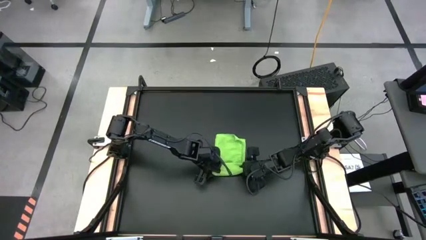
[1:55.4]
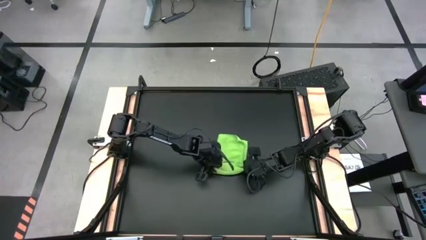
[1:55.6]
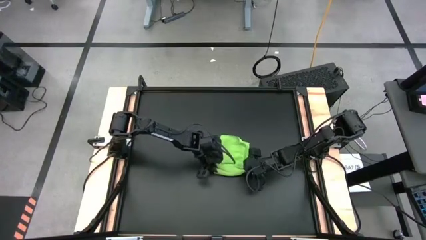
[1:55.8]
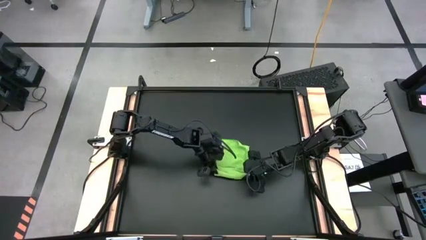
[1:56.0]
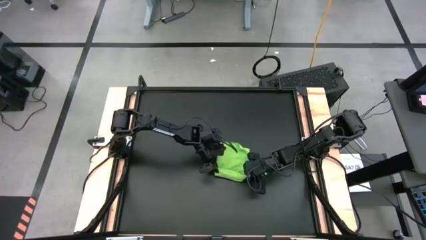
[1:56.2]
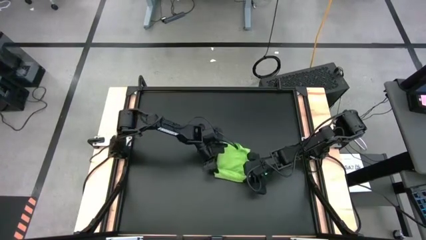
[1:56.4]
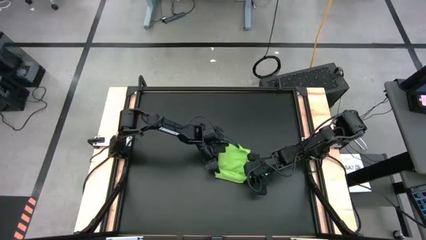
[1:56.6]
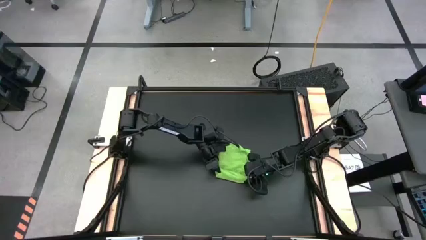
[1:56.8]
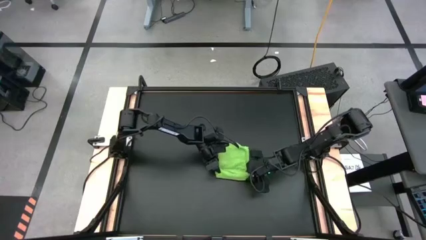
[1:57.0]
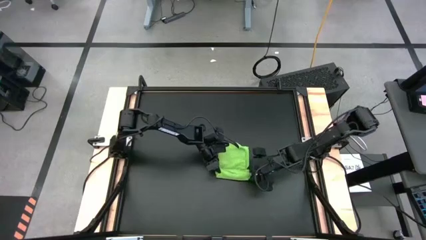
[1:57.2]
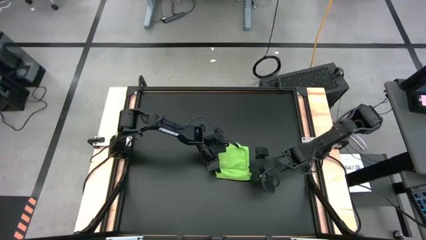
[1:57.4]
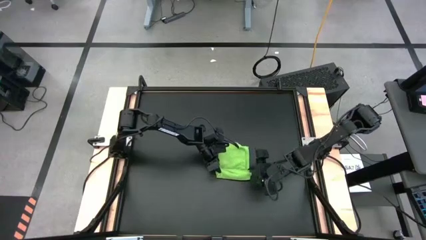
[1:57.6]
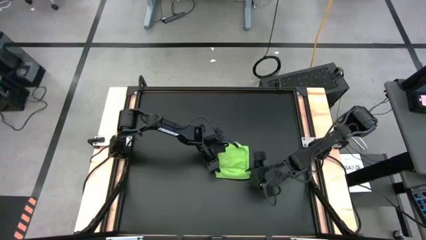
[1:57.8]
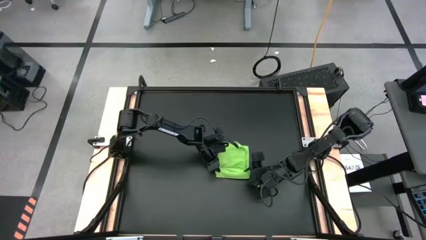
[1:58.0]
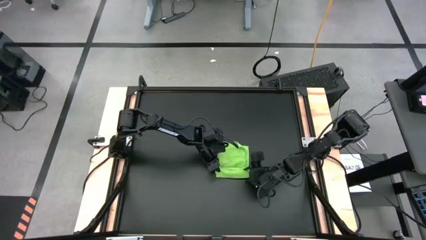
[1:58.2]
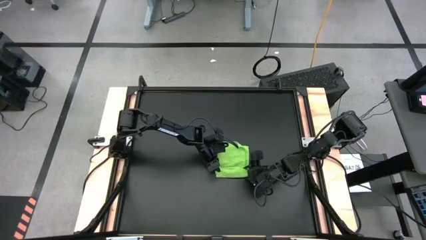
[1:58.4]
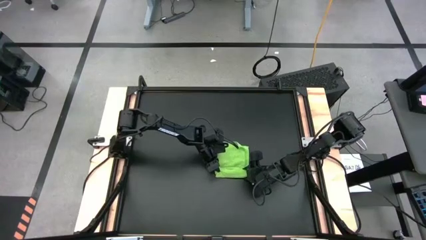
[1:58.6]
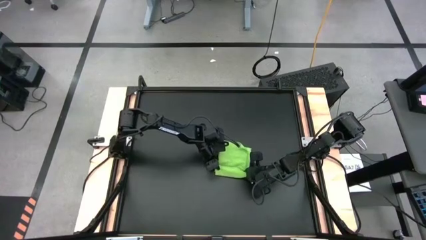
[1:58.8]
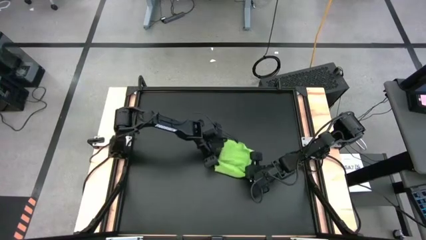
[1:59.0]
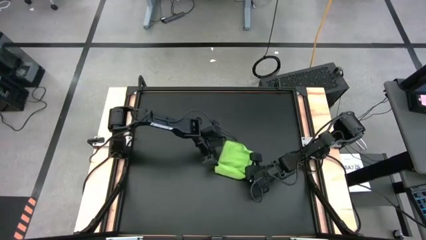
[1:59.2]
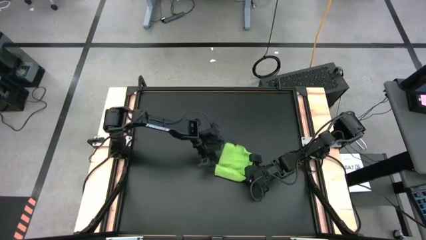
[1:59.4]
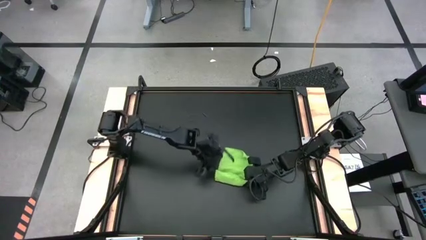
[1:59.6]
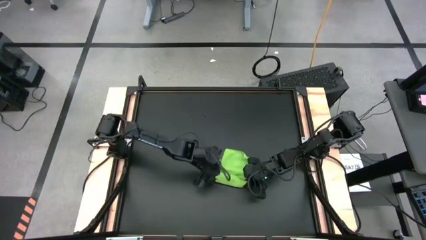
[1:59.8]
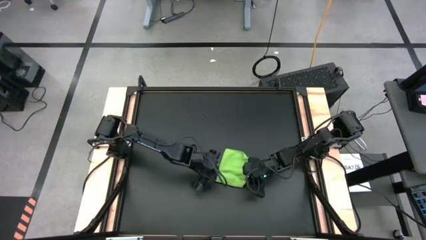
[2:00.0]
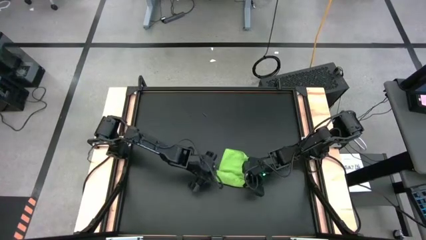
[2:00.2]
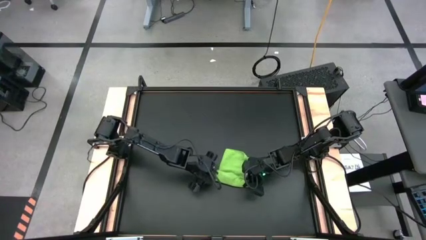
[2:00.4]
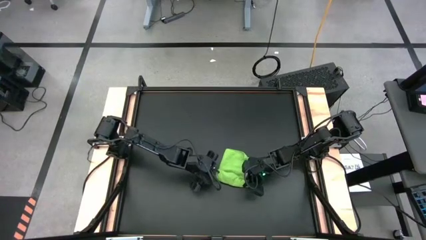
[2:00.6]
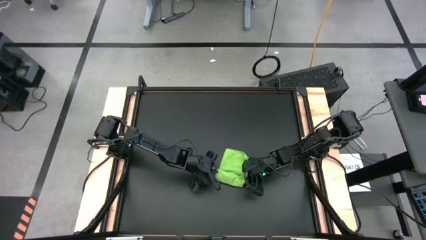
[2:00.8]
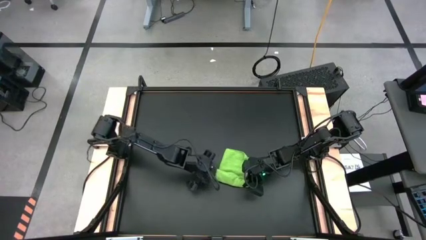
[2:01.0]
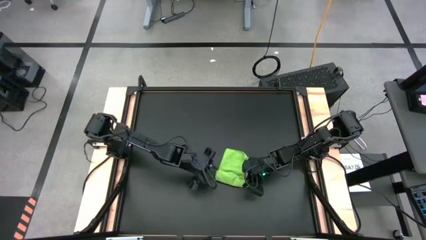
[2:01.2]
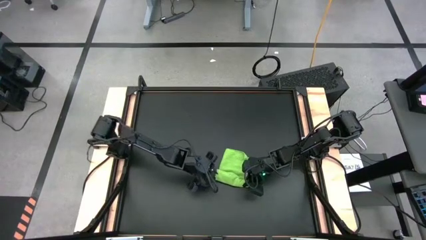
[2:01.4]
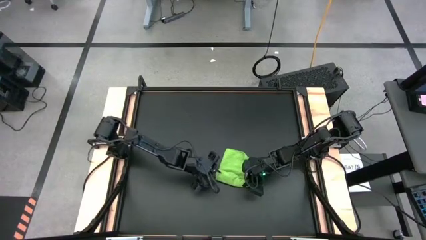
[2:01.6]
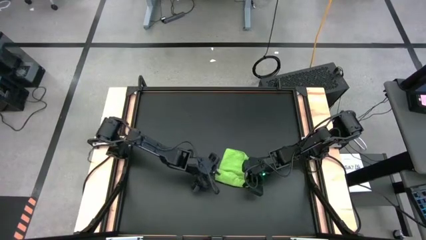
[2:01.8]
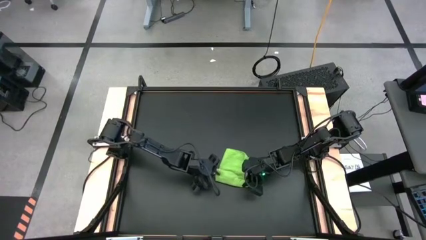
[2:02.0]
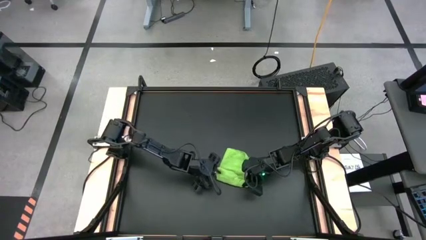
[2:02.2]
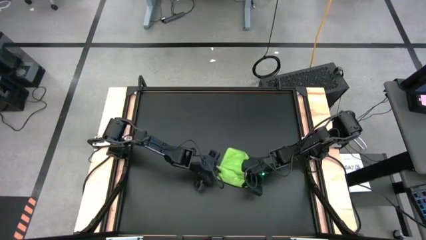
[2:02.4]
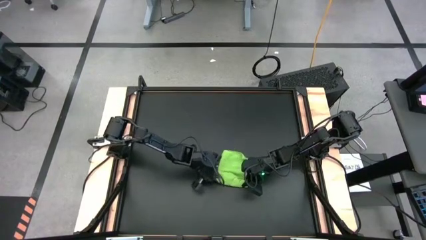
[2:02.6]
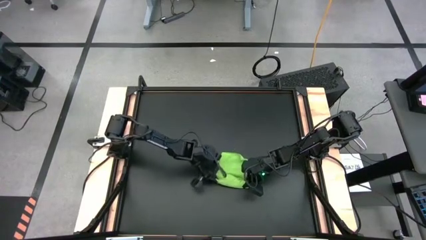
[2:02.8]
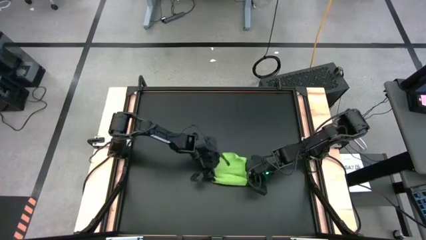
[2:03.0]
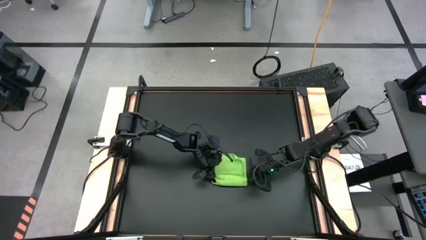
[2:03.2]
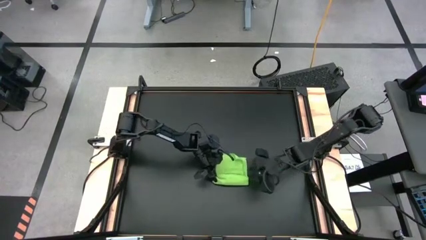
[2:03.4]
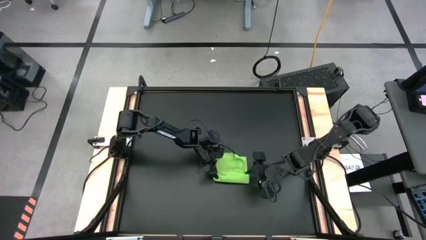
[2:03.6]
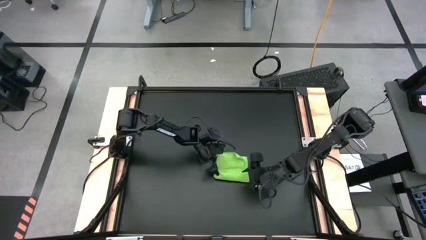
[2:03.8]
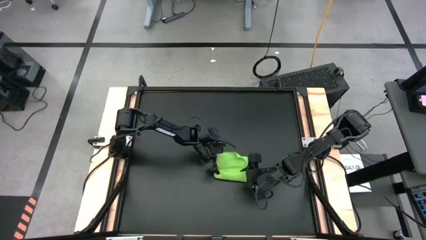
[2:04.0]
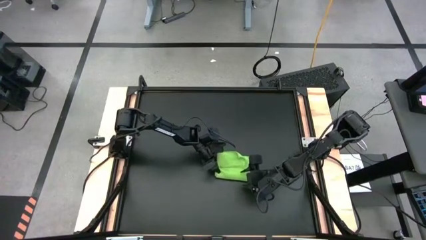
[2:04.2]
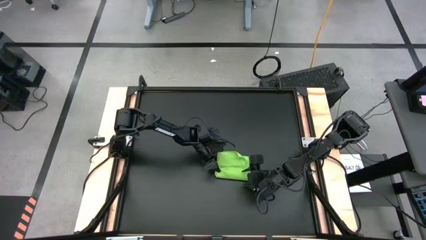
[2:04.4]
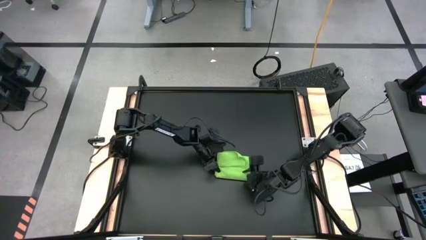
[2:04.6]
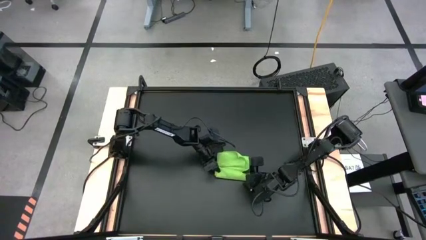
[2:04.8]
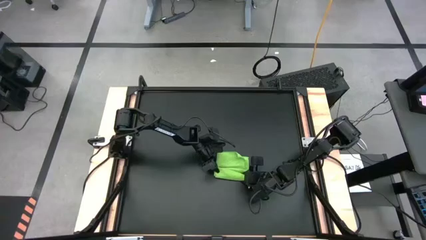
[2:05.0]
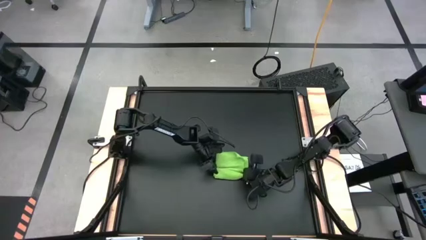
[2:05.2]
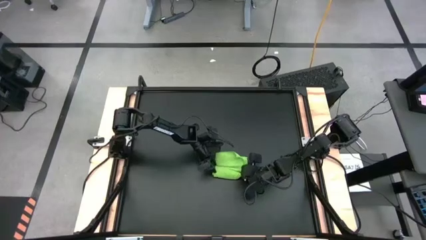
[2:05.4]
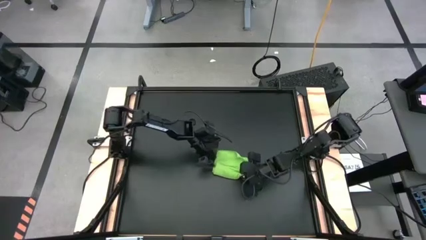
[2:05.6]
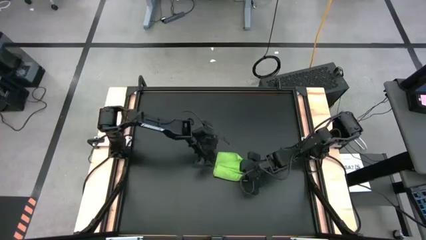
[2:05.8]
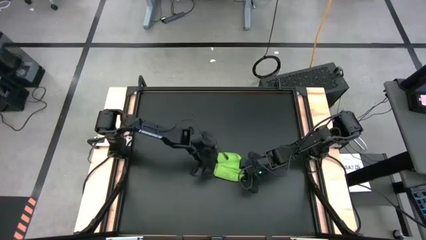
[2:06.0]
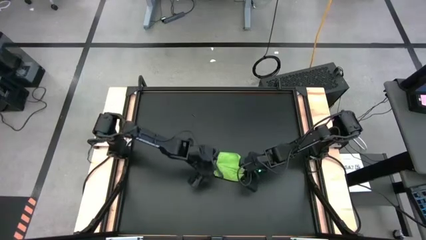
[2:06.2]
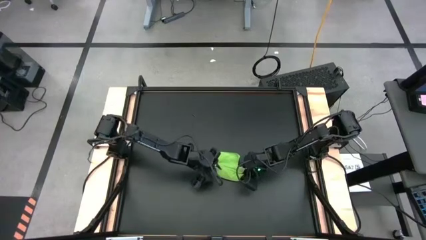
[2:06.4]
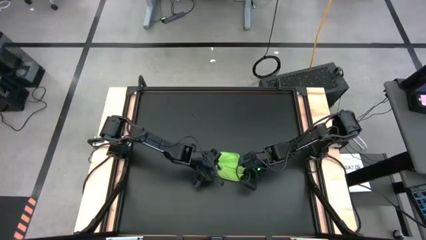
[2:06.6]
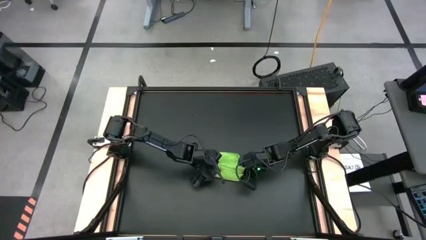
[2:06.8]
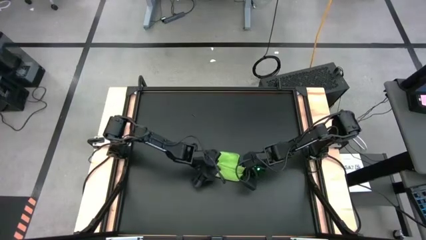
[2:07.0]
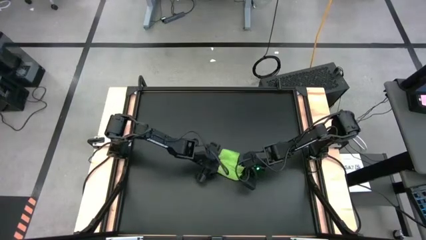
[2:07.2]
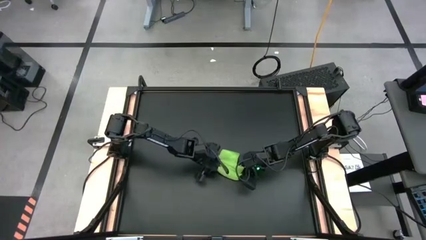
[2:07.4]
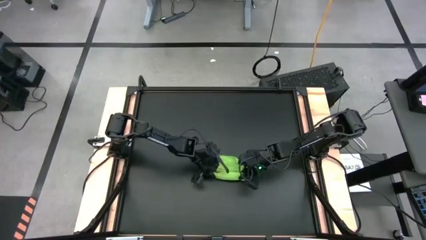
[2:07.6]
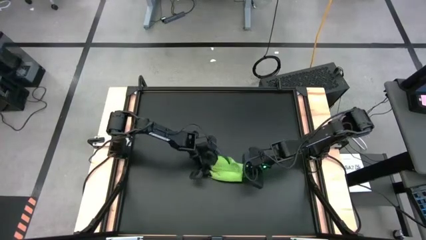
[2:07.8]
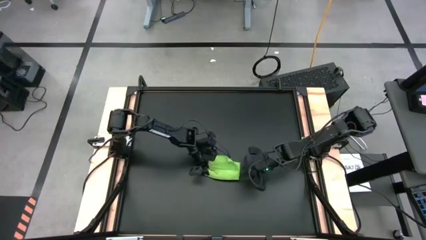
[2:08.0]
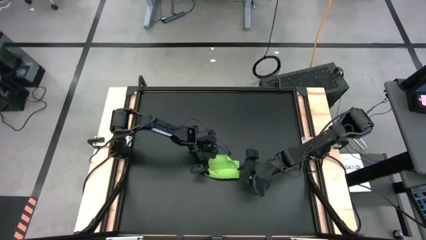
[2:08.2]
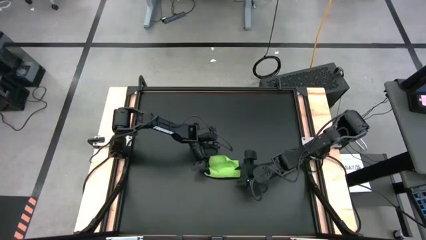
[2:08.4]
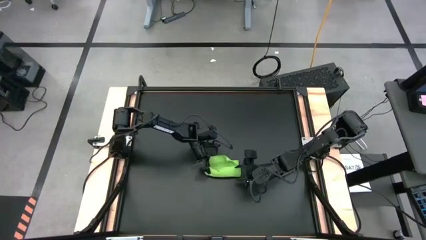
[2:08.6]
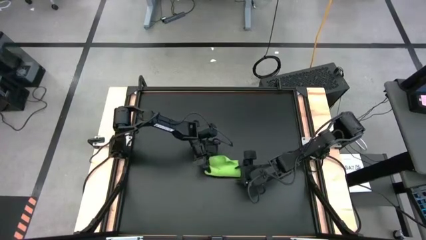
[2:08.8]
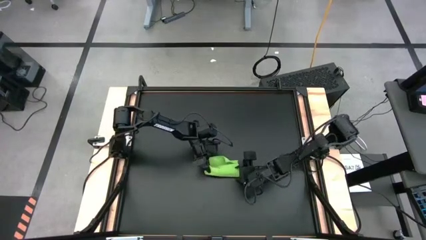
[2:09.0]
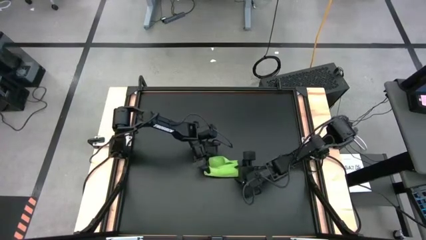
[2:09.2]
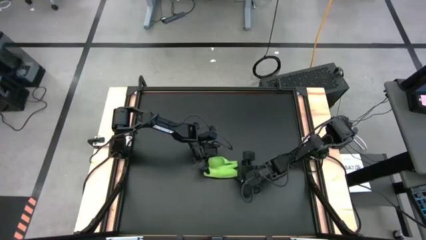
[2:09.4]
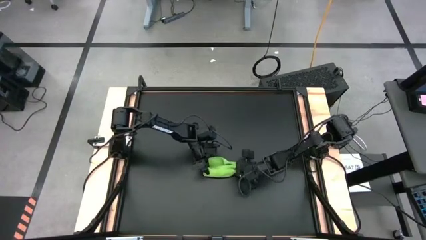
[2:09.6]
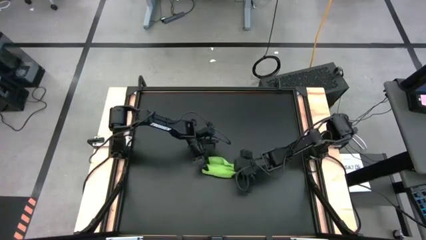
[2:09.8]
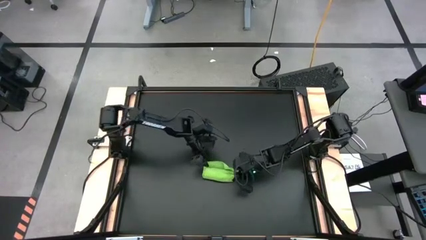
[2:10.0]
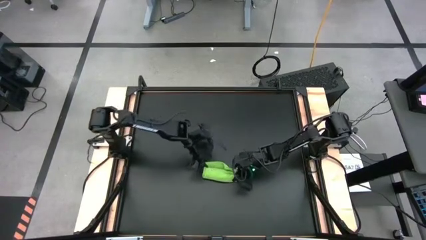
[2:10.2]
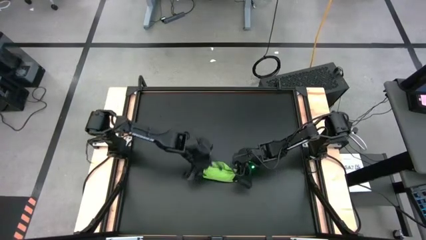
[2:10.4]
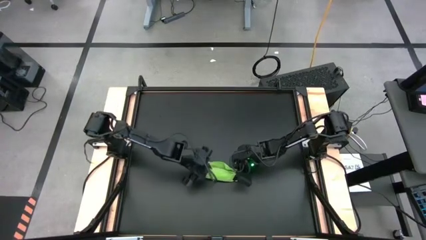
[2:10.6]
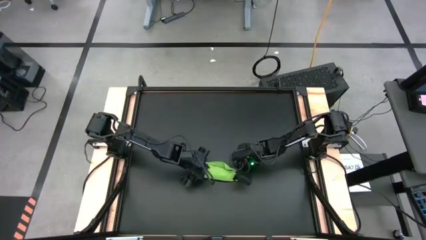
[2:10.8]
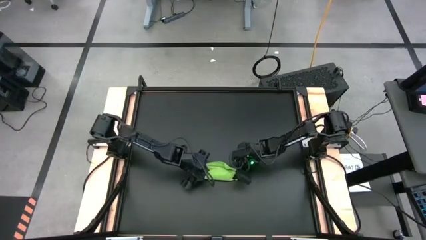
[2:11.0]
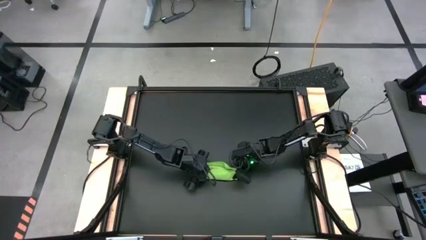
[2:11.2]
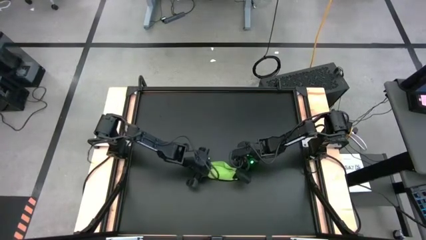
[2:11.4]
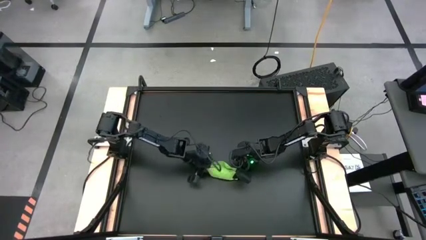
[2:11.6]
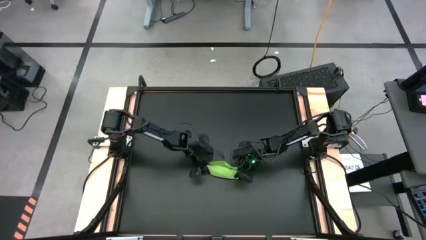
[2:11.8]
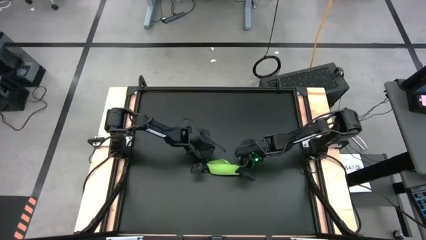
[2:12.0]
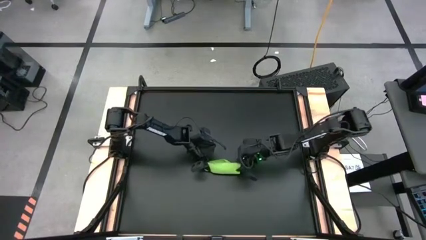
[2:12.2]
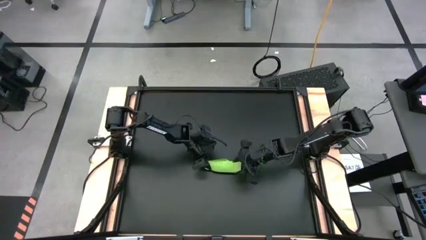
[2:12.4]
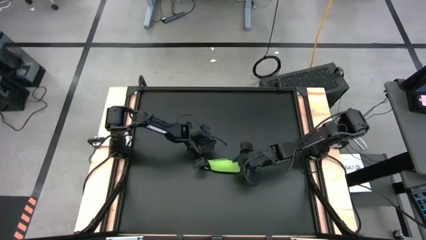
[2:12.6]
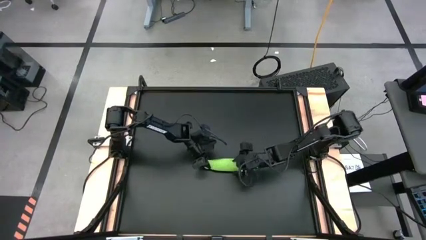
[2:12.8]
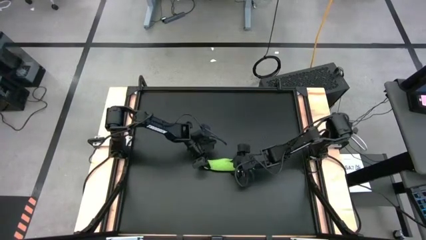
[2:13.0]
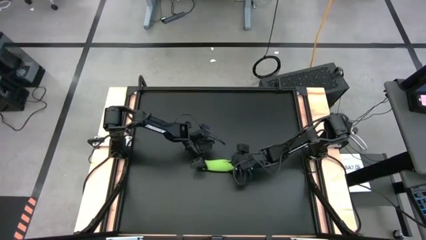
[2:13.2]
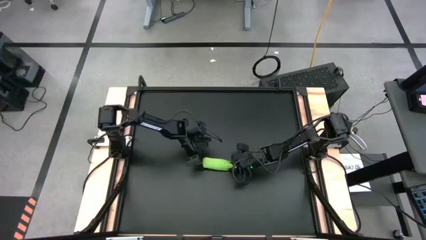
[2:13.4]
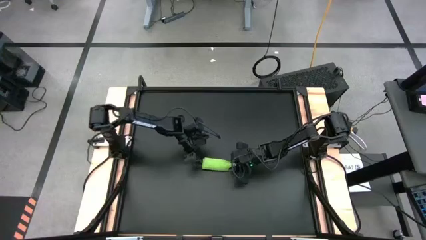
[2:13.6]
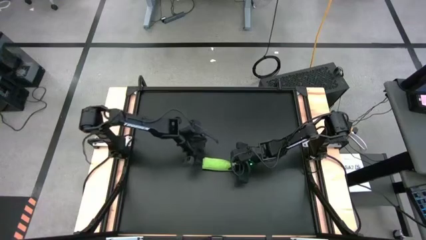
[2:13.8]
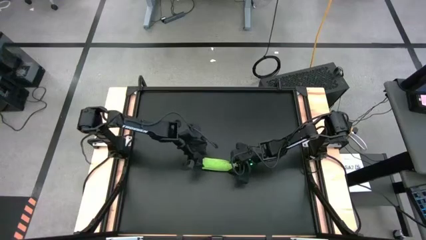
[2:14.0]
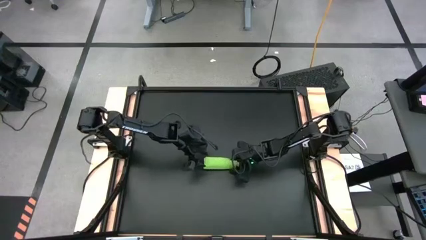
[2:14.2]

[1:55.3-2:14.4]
Task: Roll towel into tight, uniform cylinder
Roll the green towel
